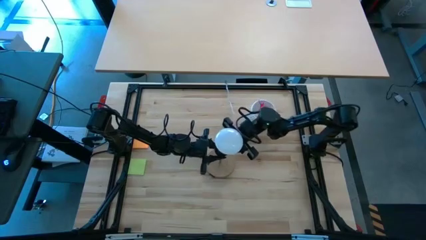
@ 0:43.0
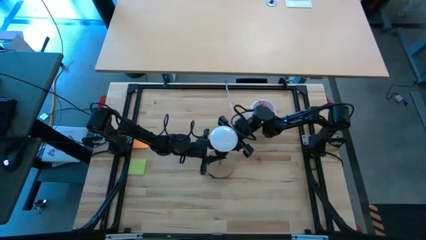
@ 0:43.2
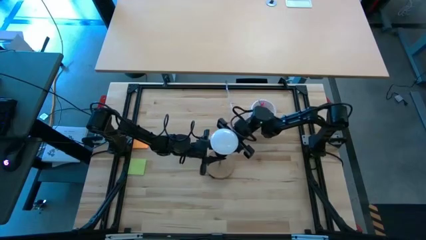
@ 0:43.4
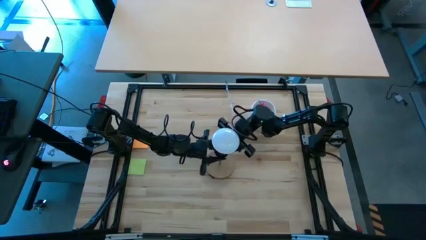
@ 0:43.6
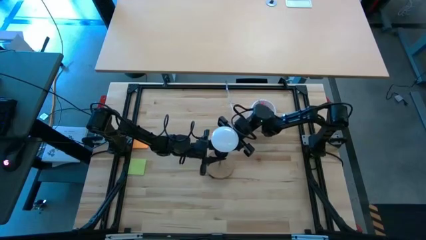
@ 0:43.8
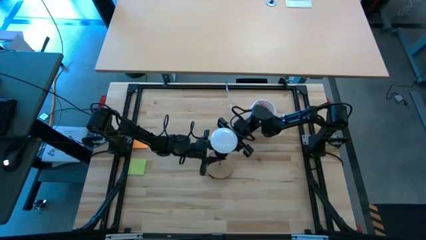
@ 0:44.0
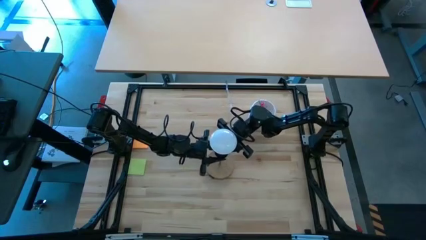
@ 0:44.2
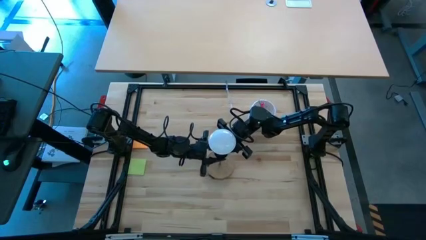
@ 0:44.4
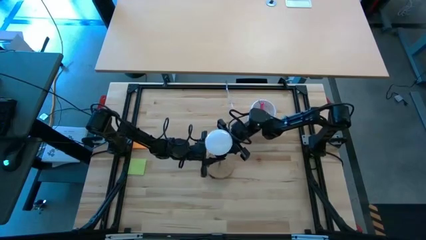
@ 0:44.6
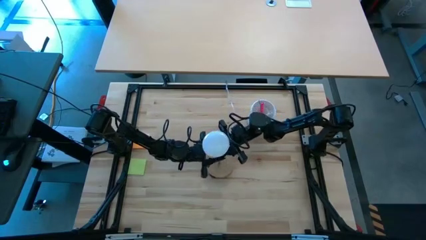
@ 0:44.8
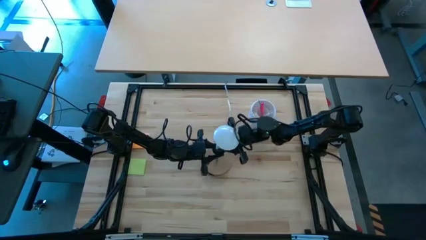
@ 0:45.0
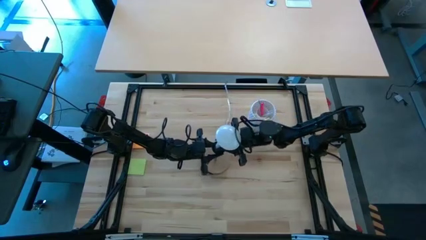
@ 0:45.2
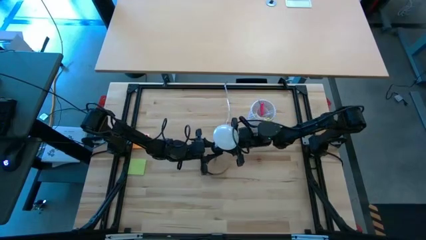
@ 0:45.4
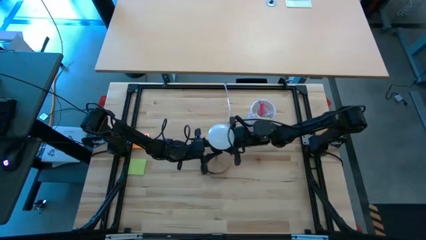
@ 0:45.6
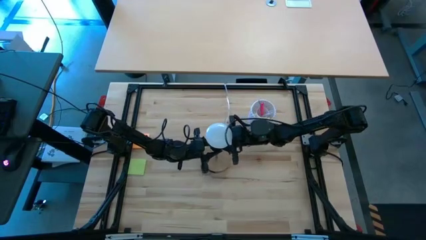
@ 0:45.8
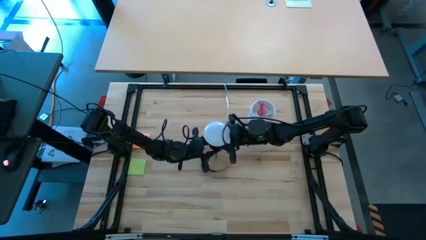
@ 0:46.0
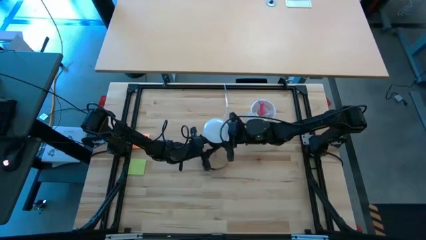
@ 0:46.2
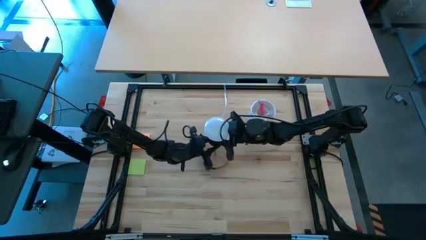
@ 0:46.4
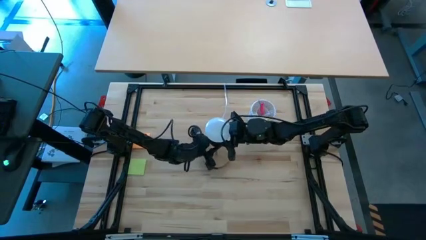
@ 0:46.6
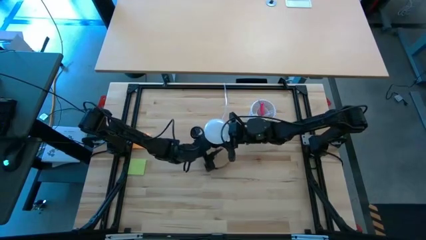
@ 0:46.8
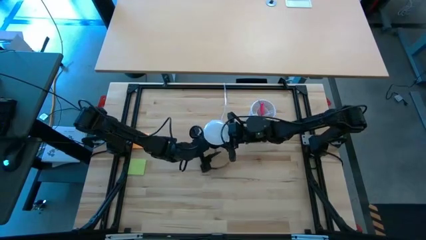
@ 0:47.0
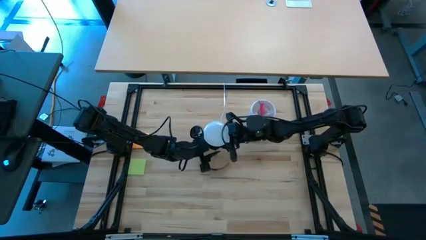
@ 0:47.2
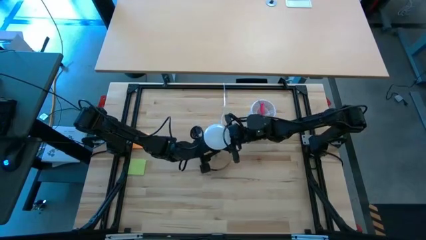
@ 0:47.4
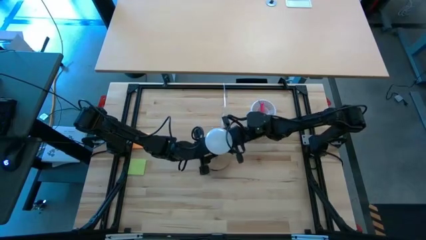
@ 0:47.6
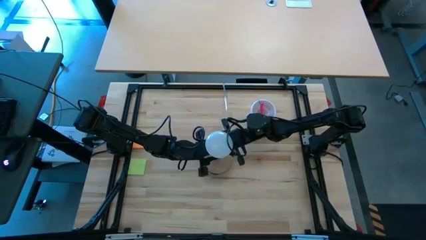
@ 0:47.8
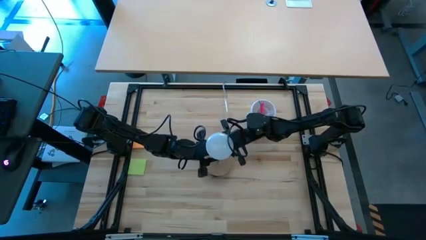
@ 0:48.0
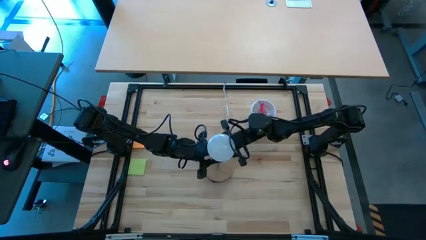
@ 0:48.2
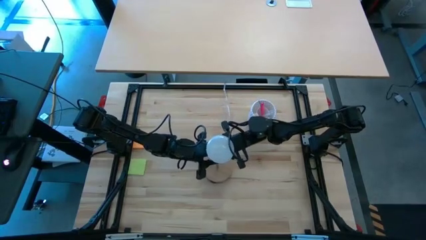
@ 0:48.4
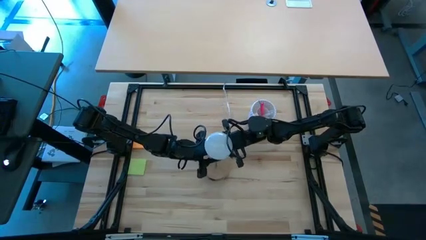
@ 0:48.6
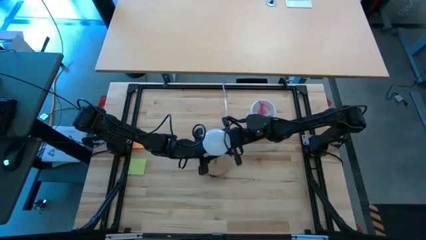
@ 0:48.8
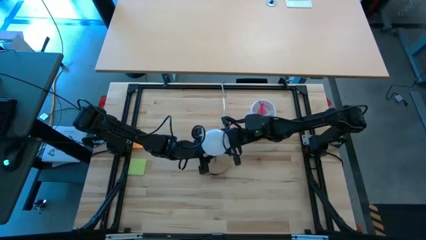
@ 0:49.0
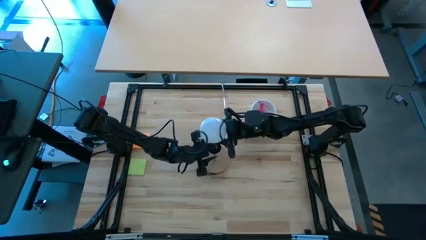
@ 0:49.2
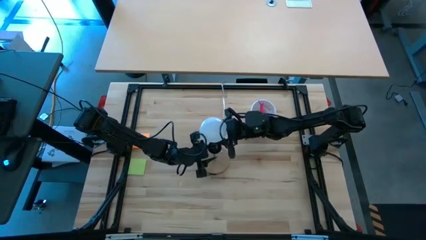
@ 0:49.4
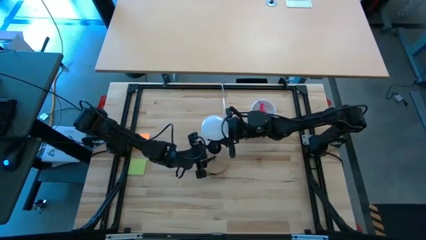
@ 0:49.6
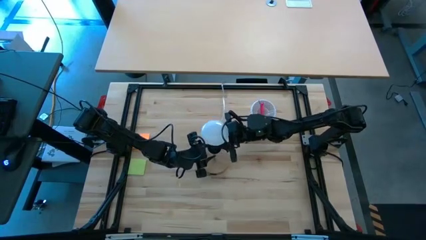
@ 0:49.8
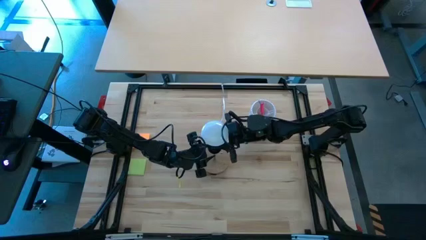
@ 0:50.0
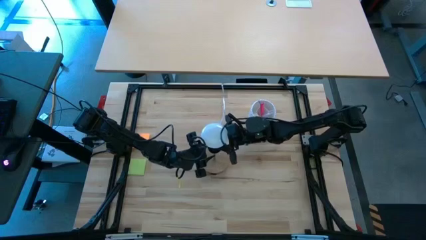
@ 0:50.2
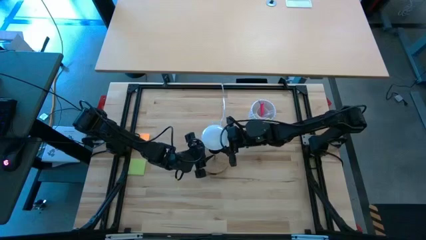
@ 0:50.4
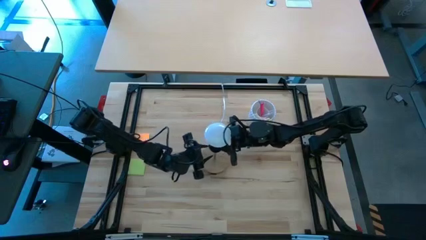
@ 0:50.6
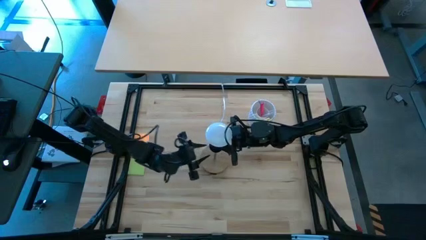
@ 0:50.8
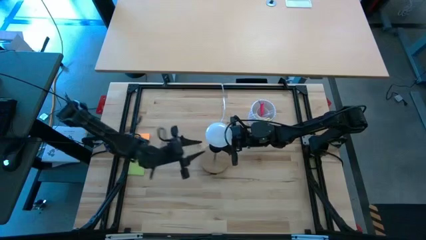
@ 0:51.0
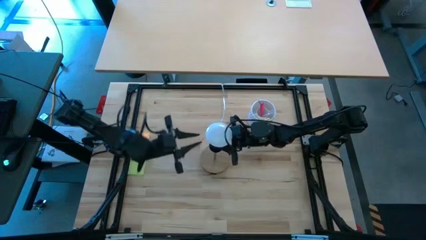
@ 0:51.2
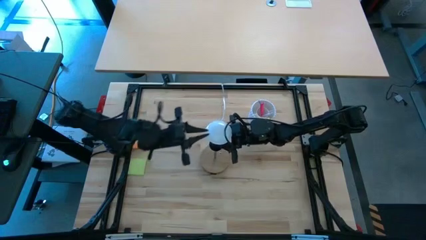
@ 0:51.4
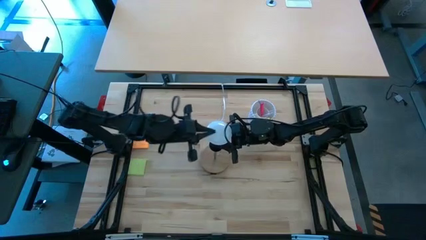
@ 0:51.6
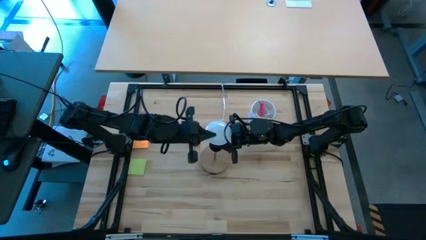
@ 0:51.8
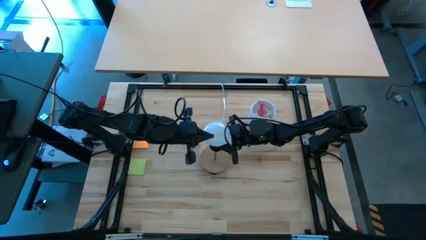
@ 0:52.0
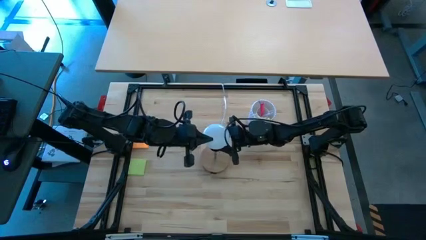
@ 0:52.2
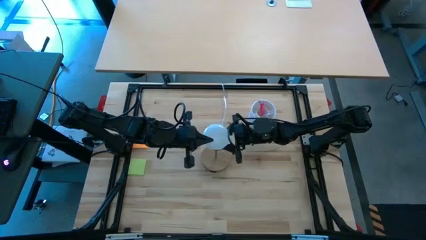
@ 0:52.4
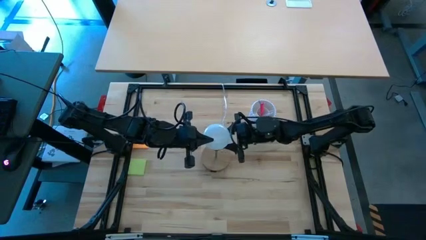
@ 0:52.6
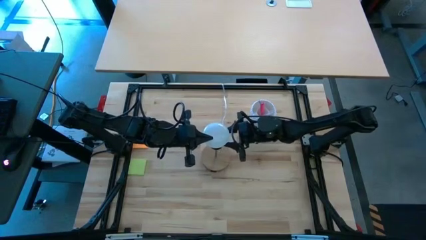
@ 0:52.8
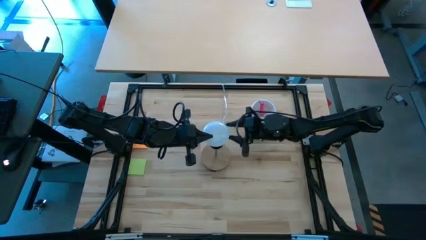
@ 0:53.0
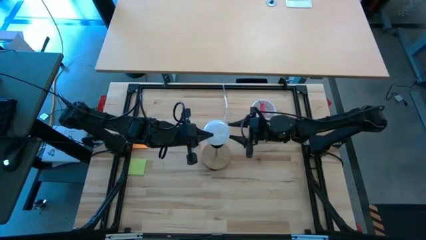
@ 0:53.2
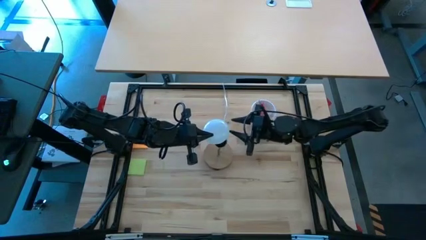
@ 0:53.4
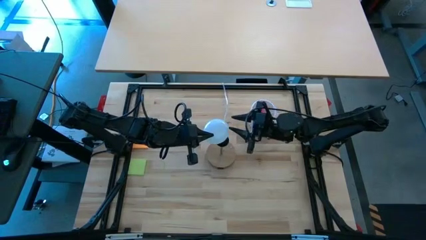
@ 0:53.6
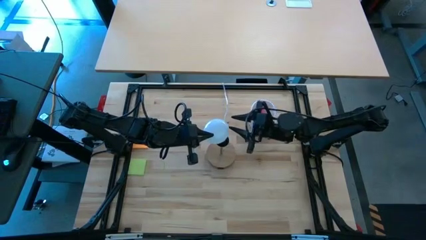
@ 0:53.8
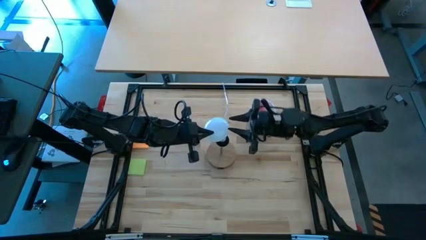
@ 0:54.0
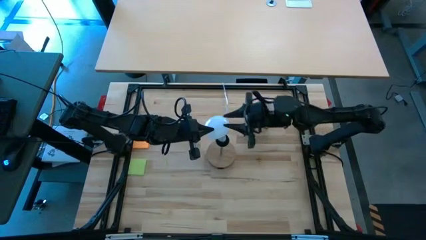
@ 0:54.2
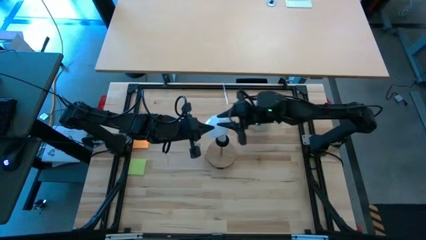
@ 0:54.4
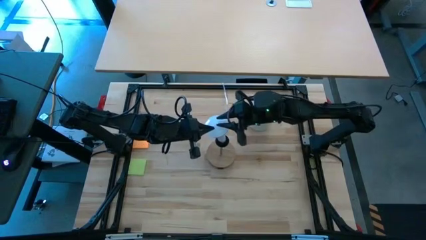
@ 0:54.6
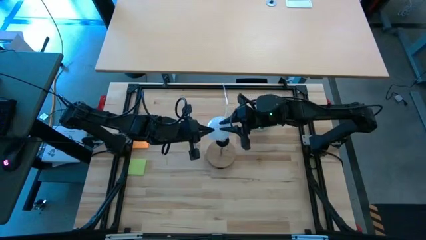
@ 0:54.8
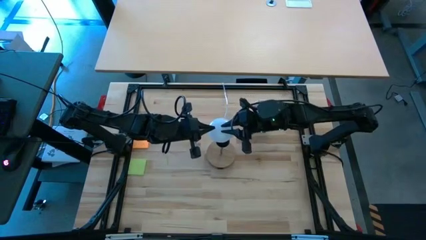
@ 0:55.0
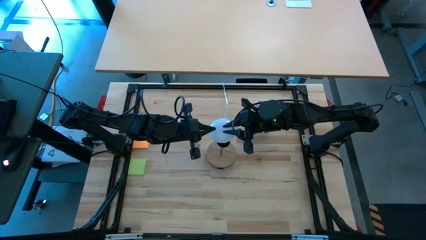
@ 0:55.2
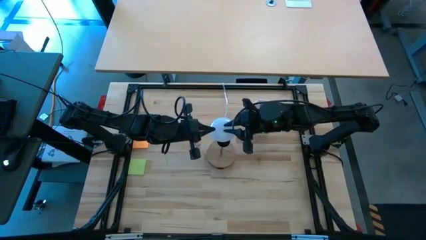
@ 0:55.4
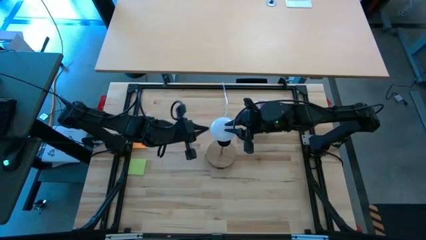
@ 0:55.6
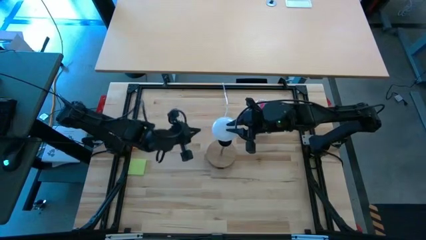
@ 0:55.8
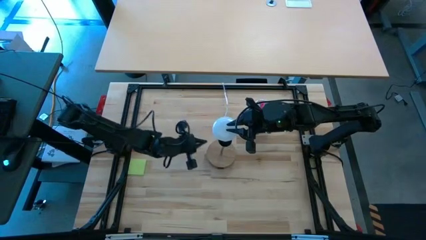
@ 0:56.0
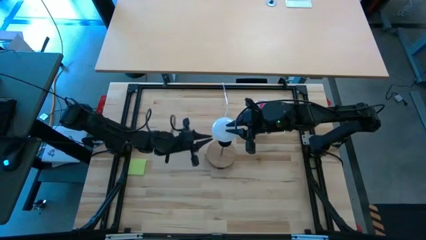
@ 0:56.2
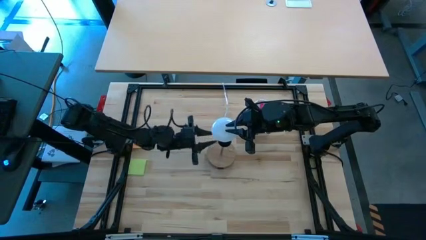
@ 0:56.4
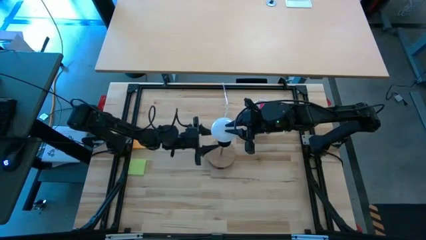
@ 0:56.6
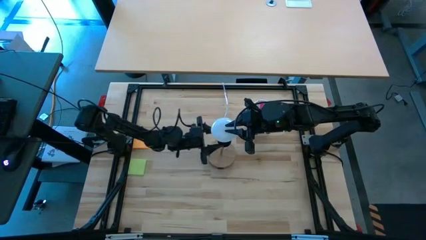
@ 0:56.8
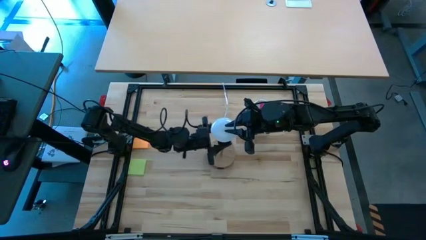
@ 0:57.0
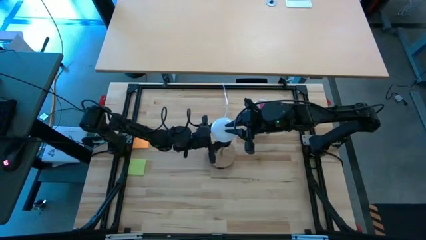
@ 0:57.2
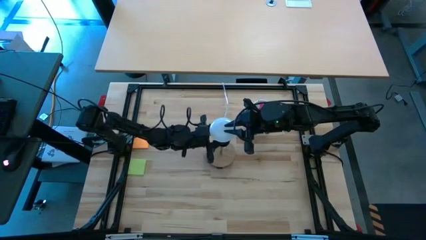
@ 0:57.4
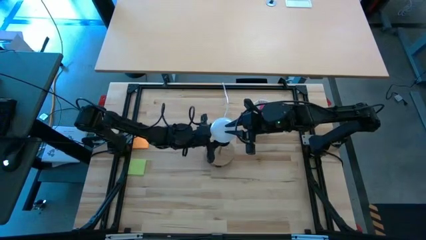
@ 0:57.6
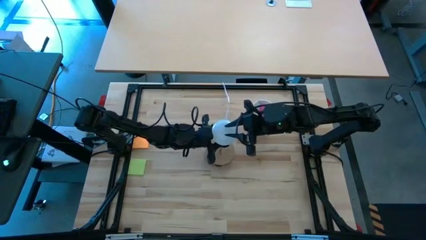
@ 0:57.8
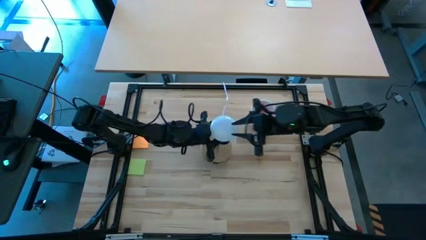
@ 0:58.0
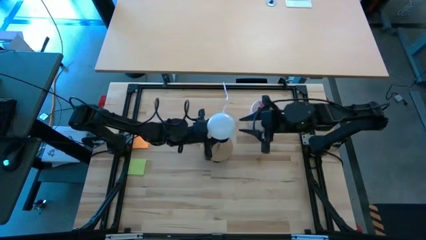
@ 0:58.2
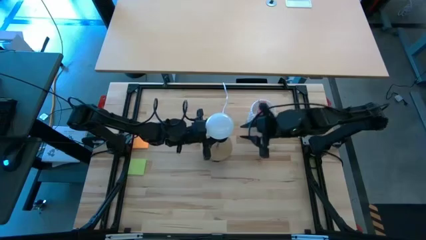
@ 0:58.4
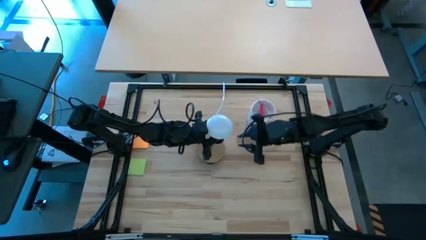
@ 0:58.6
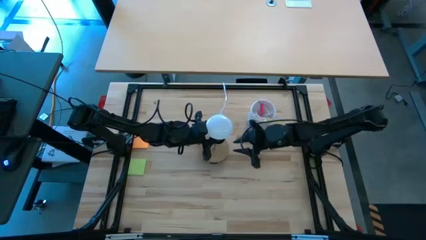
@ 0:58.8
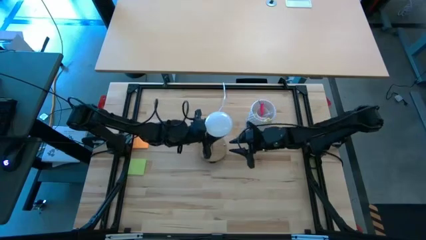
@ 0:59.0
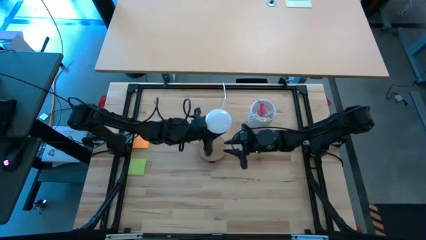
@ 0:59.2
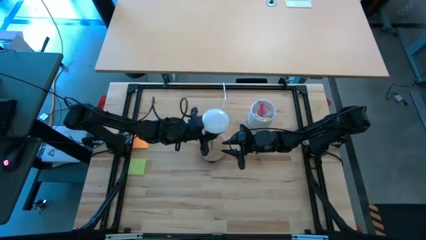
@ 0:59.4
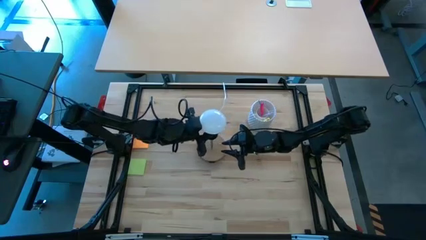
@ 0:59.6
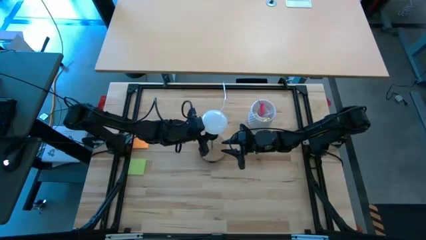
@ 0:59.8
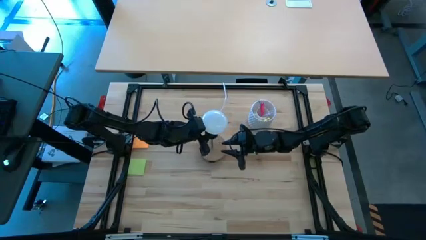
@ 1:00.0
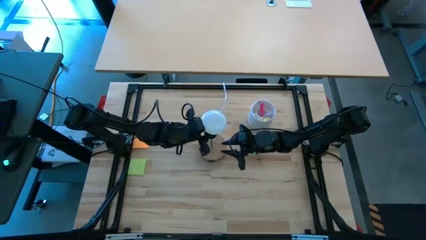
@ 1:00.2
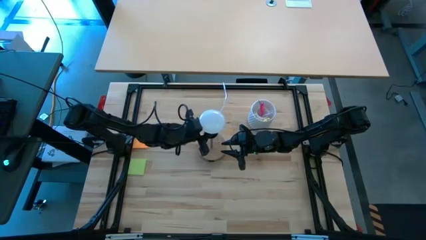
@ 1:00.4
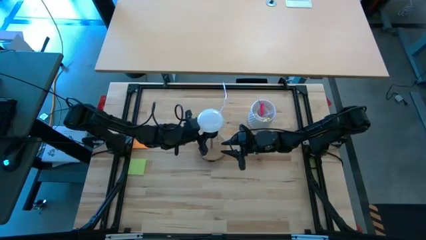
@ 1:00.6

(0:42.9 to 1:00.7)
Task: Screw lightbulb
Insert the light bulb into the brown lamp
